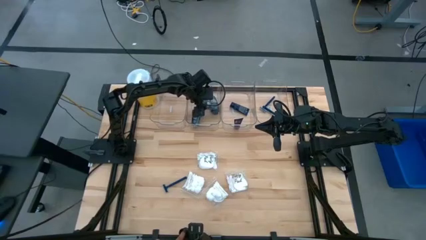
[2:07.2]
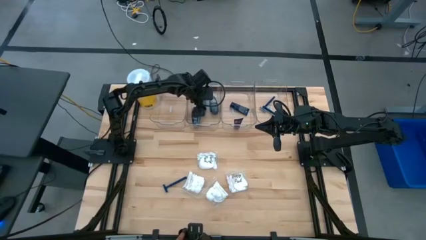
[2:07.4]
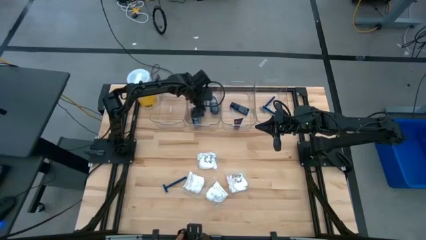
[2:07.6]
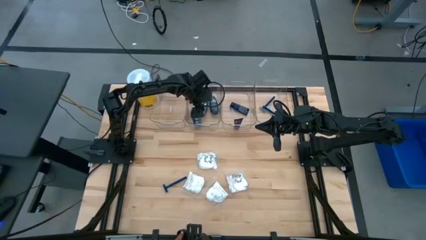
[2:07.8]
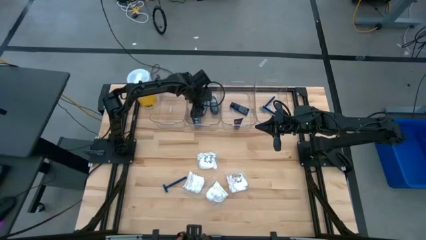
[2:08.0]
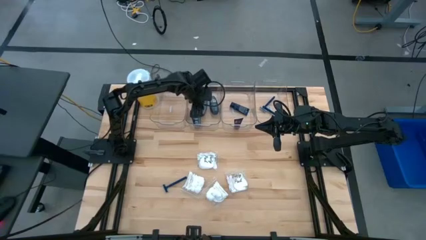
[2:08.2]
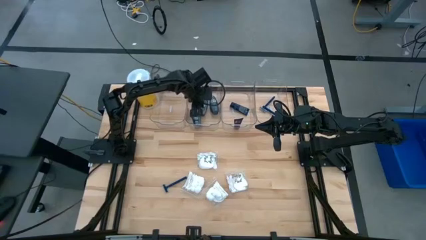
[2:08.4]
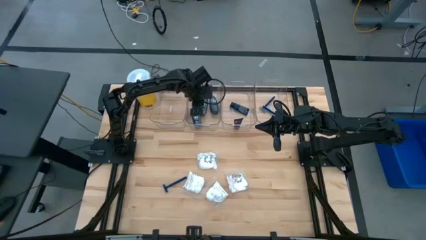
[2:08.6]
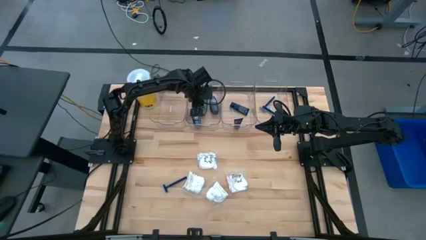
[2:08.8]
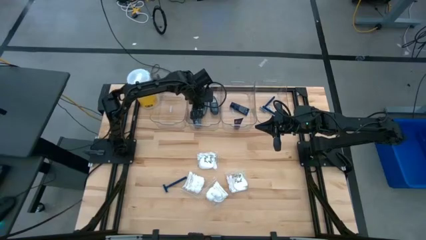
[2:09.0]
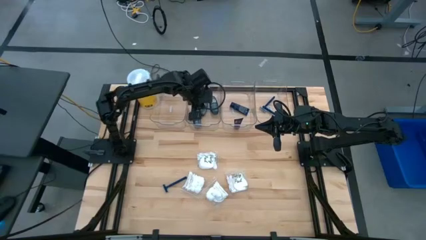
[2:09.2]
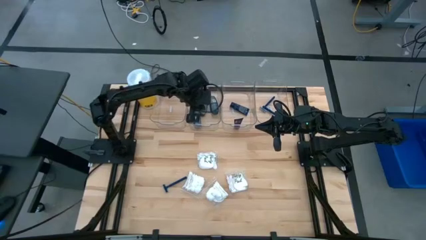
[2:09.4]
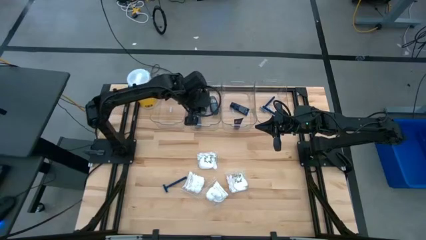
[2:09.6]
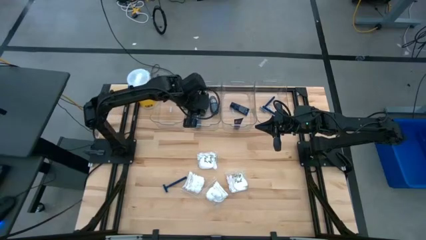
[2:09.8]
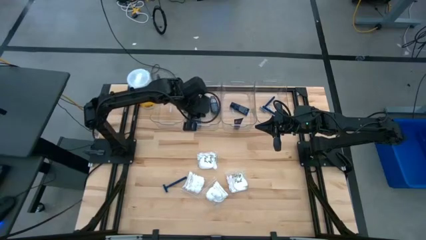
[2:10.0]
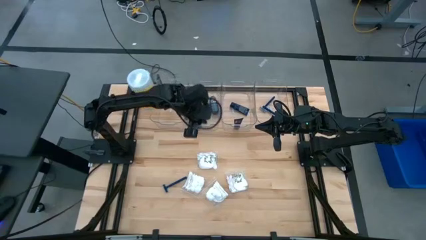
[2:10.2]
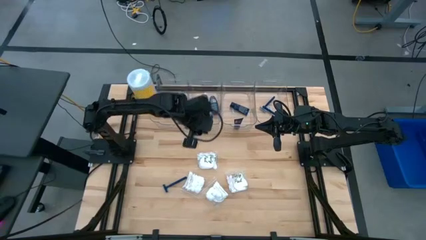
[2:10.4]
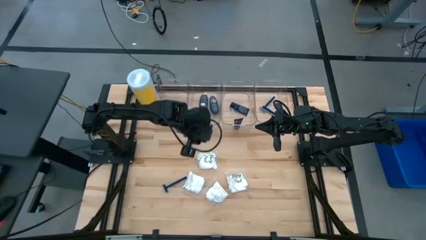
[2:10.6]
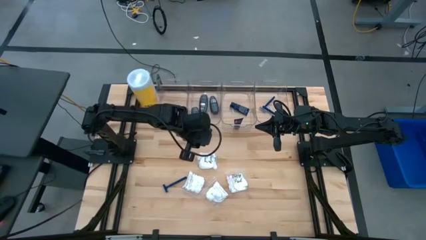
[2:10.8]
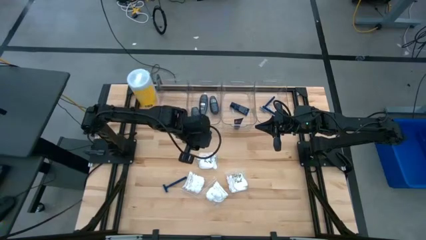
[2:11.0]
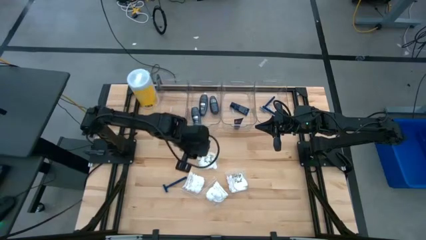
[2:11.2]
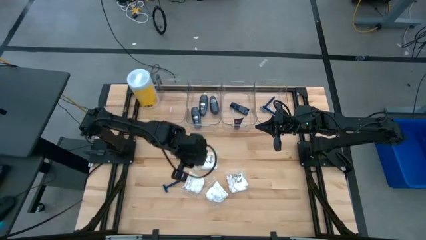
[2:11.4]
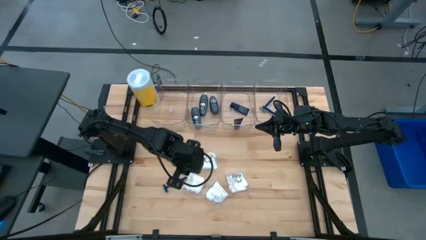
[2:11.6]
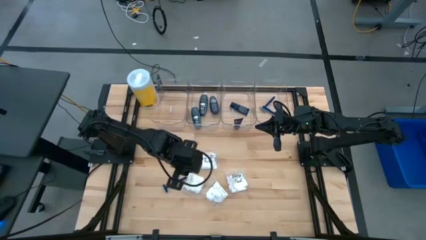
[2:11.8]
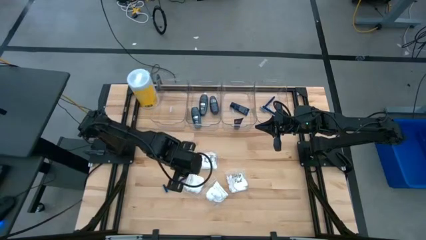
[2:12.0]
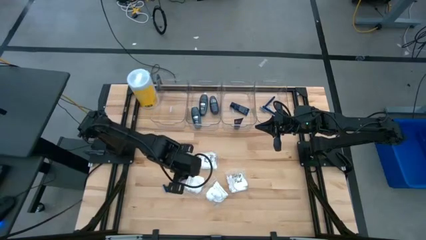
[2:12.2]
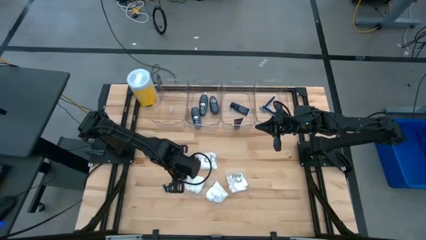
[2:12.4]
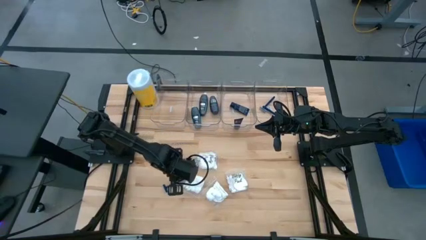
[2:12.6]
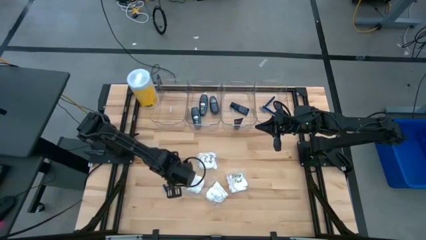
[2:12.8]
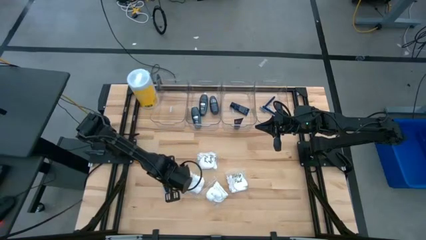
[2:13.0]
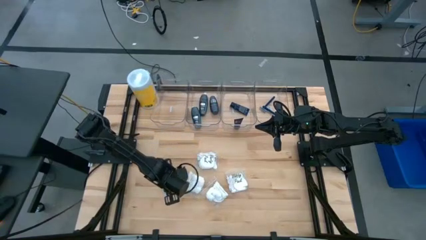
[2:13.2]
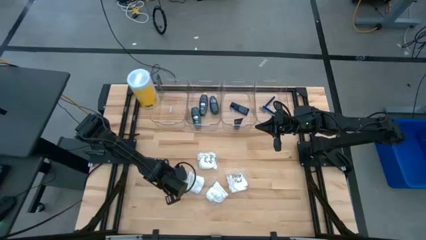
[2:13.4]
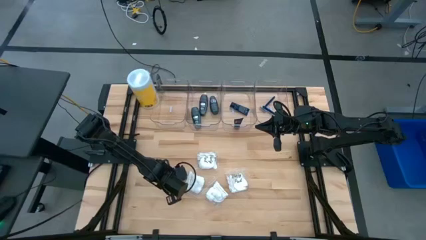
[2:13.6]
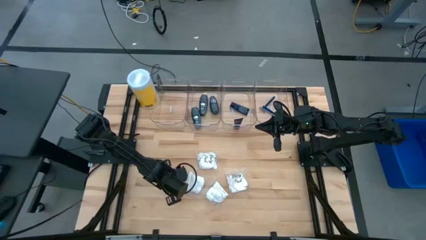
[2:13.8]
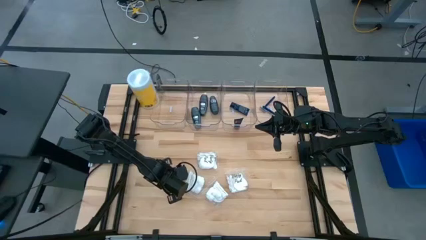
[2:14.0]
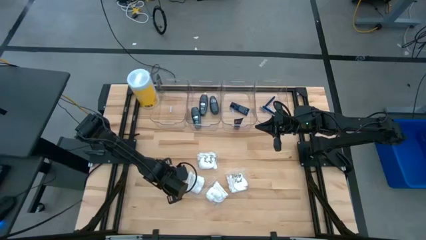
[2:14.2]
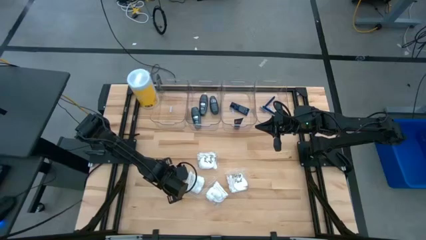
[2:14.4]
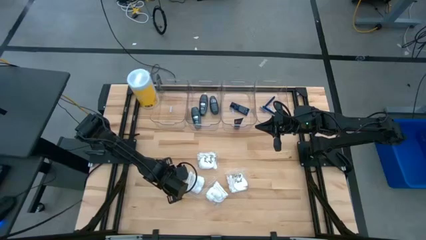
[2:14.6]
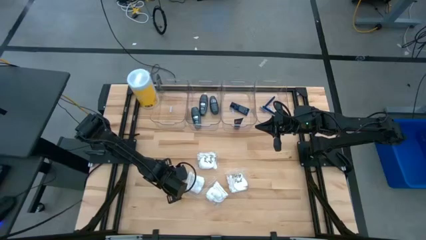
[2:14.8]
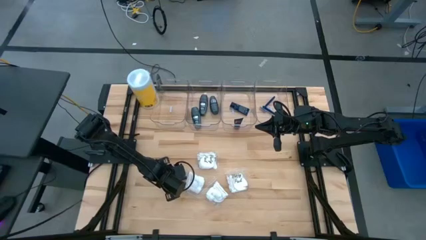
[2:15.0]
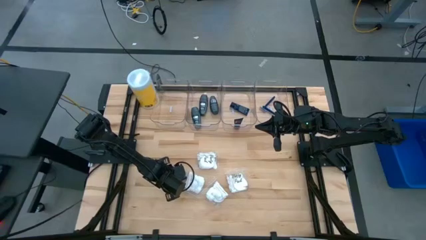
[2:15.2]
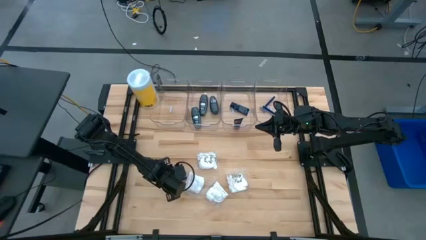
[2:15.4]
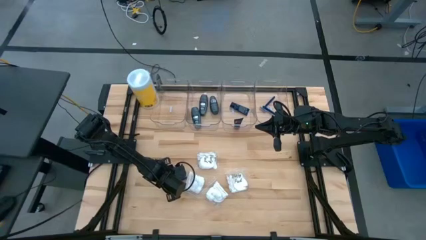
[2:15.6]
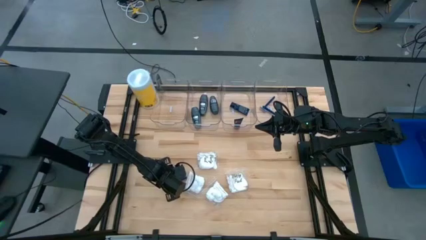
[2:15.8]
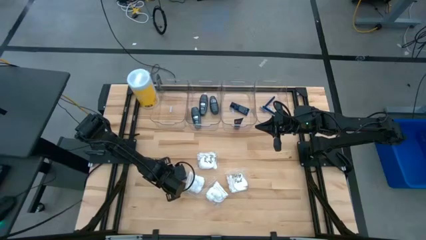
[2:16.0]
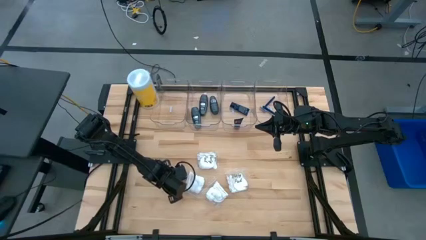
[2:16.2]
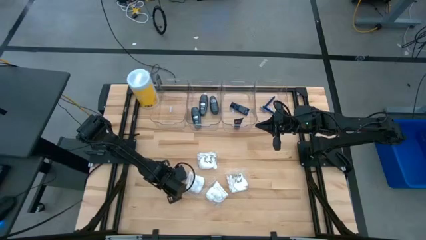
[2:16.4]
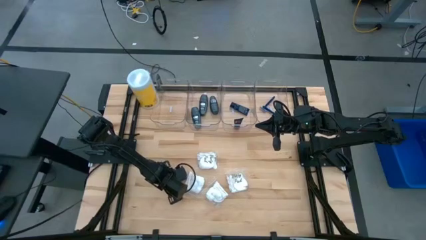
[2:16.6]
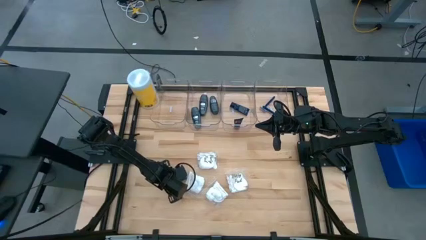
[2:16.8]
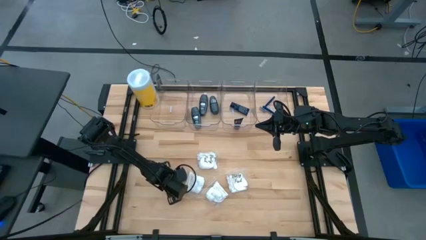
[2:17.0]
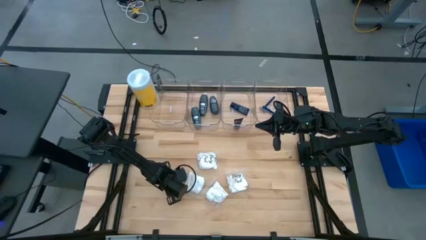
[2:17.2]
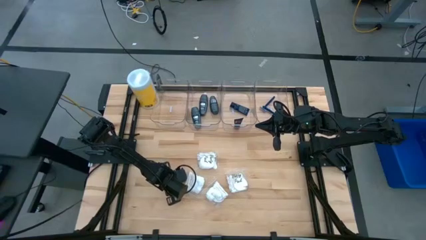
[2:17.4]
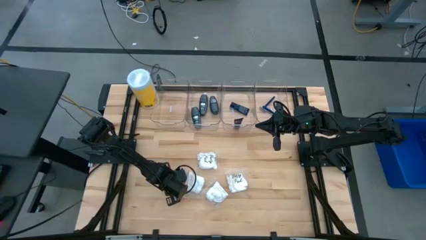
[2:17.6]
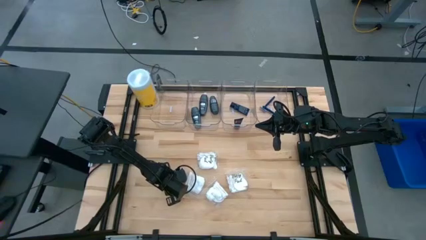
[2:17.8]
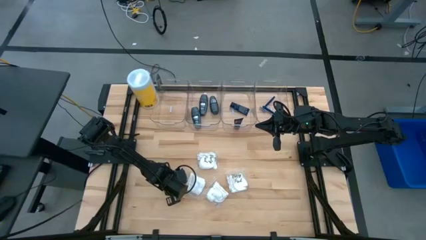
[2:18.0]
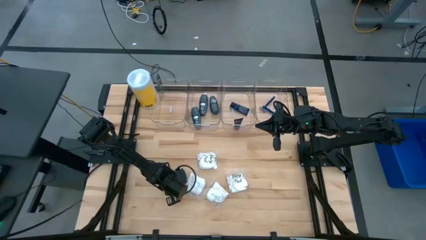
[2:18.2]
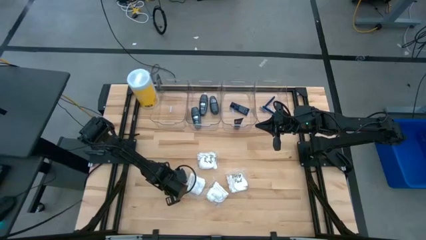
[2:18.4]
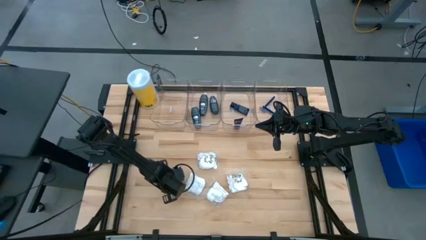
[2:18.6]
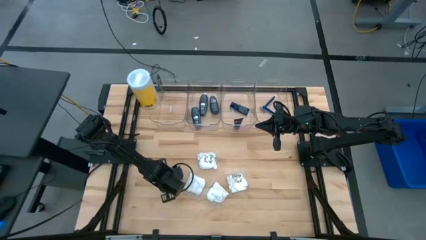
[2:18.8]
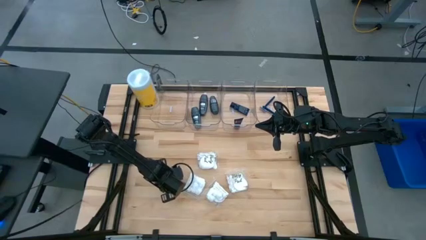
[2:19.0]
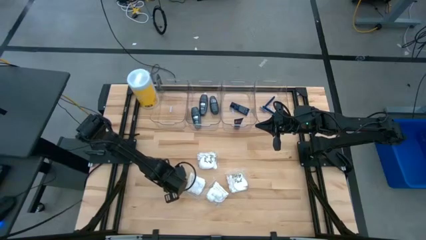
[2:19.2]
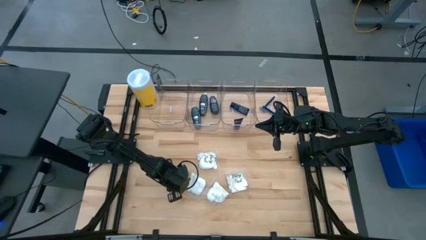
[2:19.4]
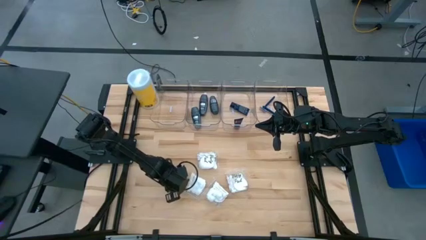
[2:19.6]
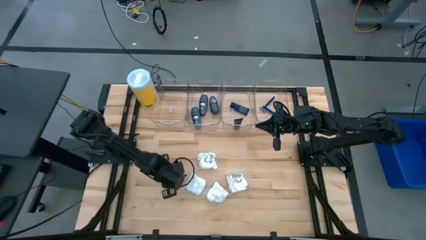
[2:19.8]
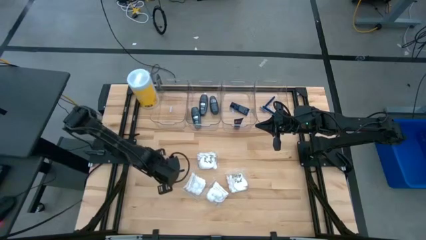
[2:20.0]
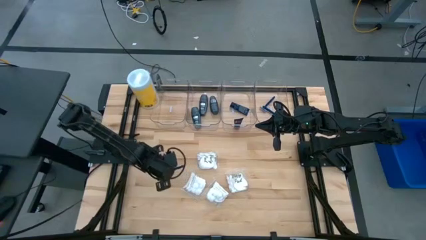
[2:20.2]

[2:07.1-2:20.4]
Task: Pick & Place Travel size toiletries
Put the blue razor into the right transparent bin

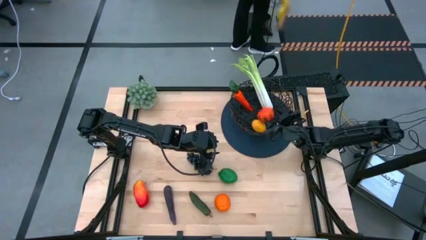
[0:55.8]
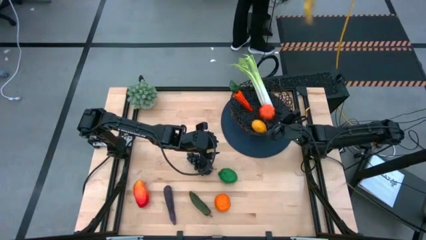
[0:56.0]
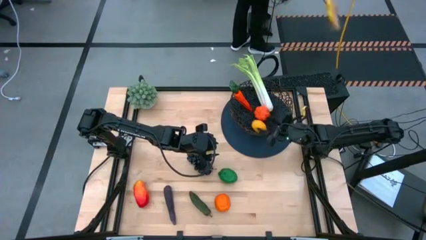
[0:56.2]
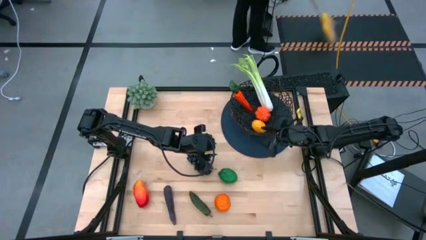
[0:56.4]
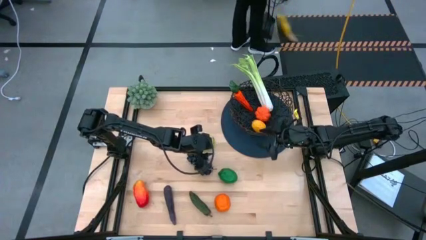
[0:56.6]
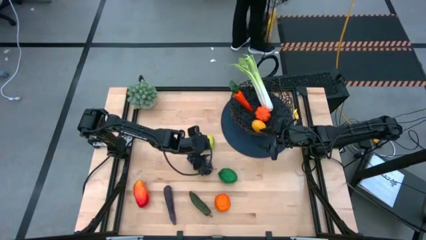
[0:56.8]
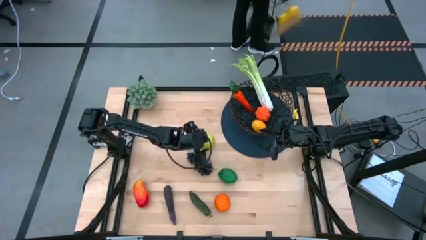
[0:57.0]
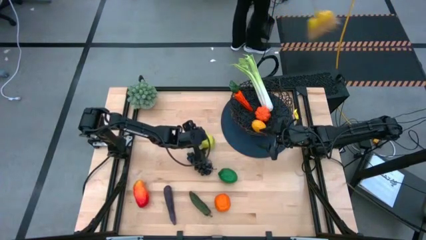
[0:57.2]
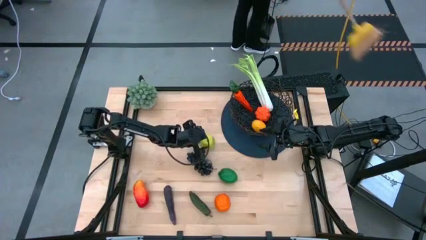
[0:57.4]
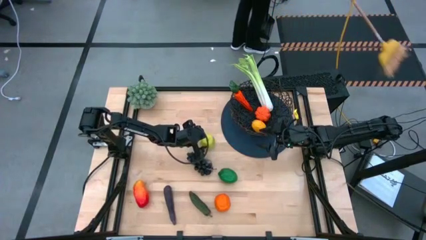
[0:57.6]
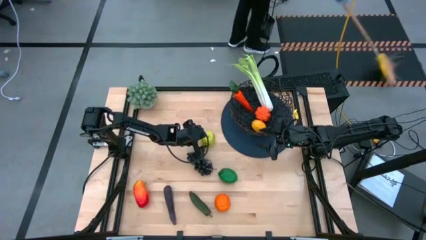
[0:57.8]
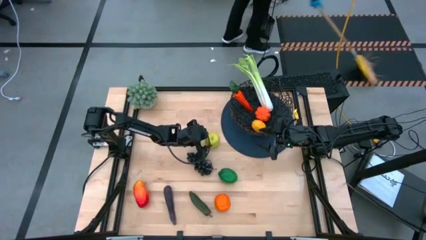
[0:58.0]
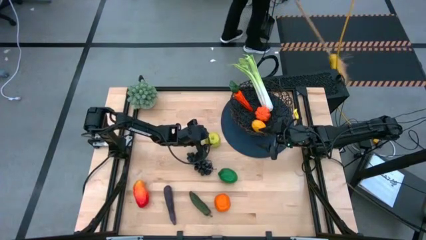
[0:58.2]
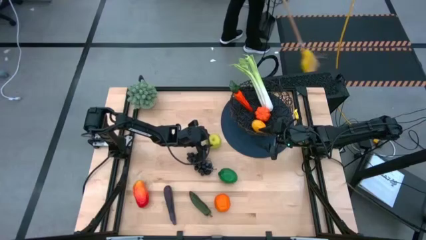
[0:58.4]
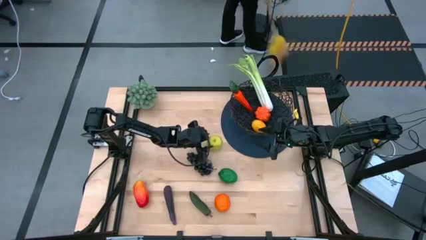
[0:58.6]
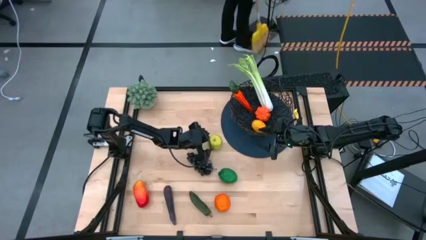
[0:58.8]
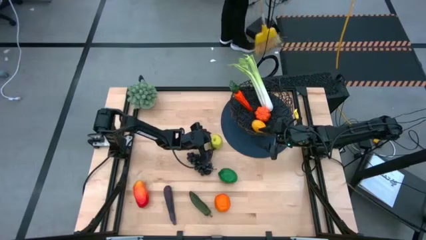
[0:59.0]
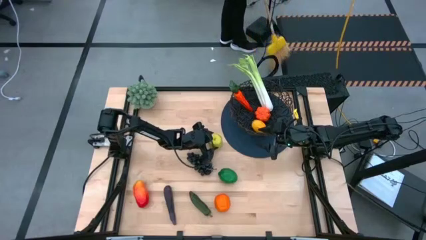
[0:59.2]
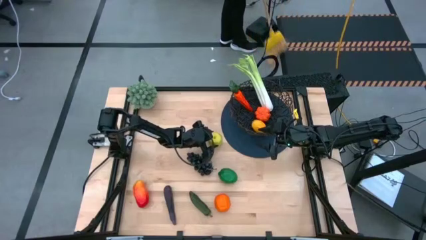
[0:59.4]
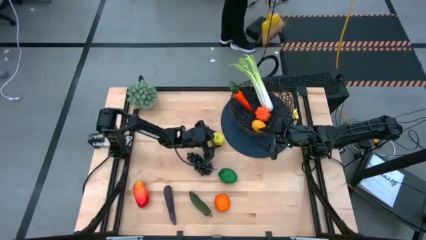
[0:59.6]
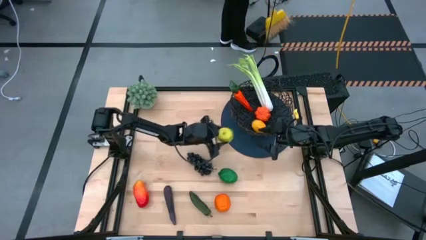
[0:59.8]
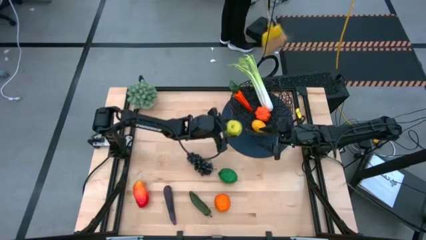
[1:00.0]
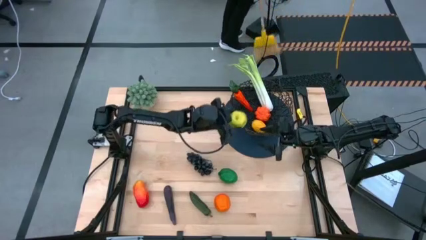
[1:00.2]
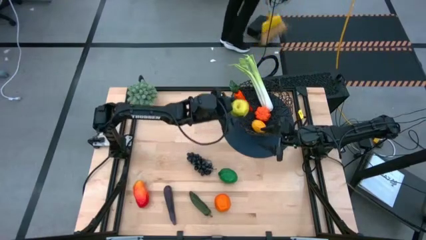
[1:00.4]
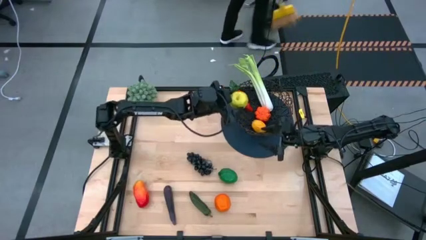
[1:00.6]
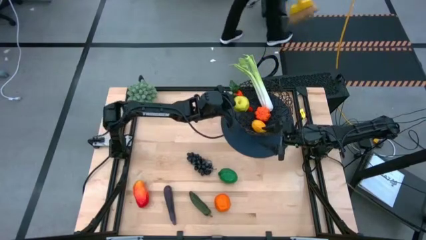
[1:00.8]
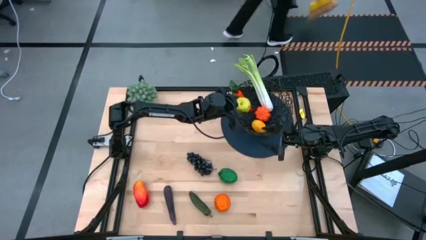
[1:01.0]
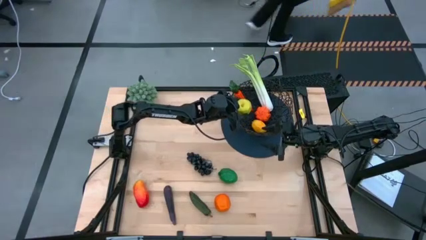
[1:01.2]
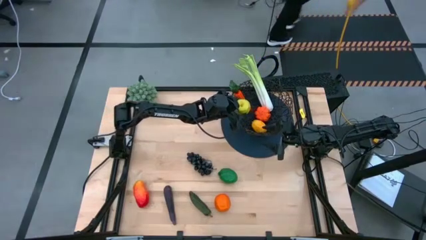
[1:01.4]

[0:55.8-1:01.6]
Task: Build produce basket
Put the green apple into the black wire basket
